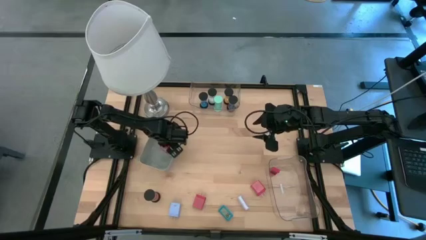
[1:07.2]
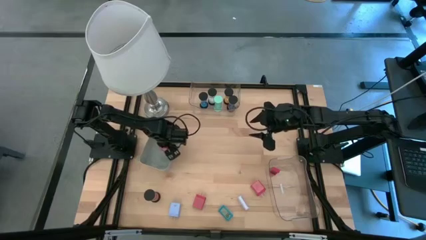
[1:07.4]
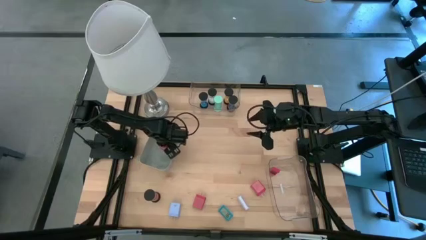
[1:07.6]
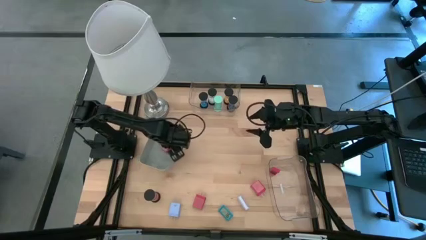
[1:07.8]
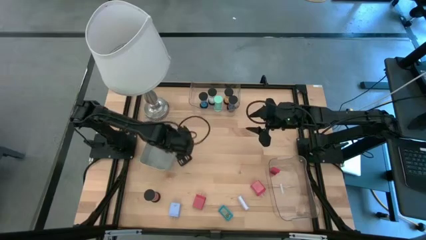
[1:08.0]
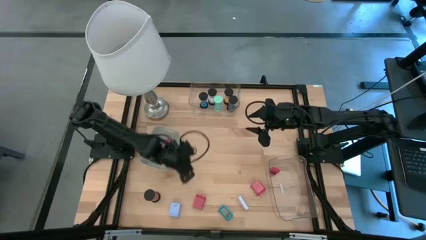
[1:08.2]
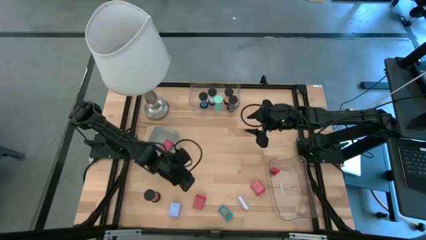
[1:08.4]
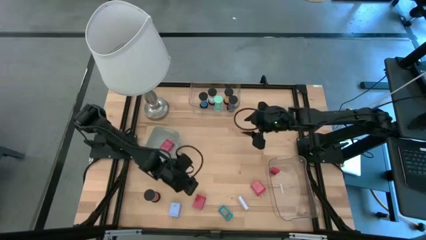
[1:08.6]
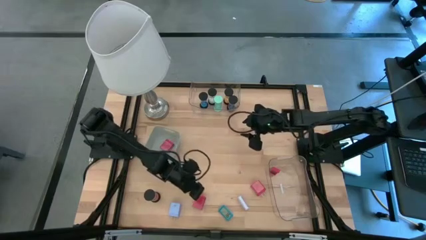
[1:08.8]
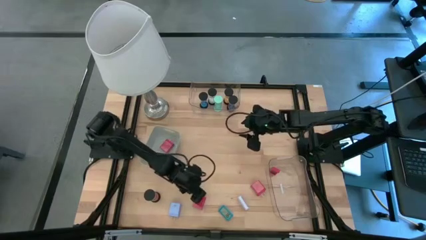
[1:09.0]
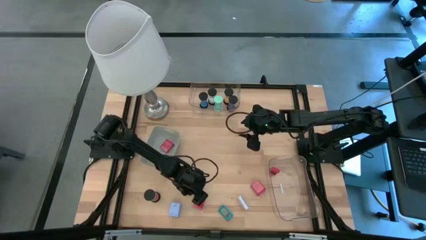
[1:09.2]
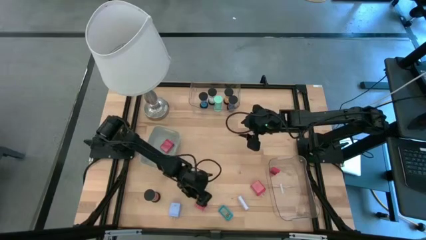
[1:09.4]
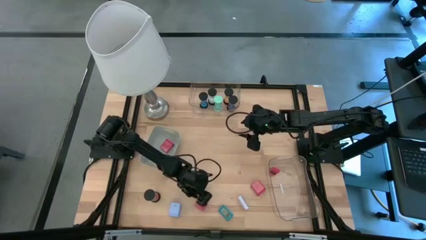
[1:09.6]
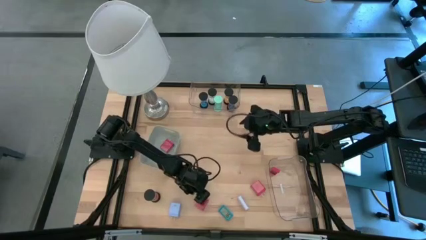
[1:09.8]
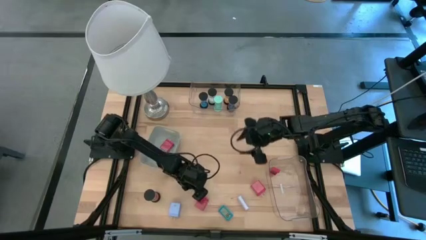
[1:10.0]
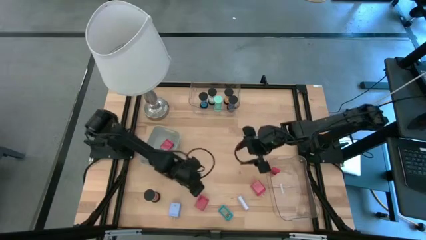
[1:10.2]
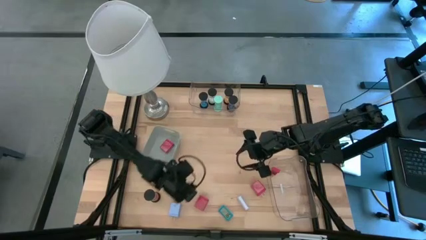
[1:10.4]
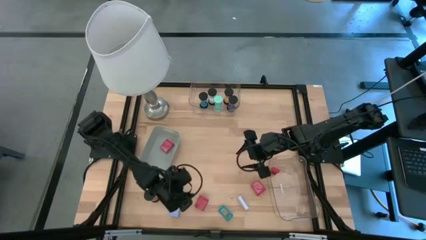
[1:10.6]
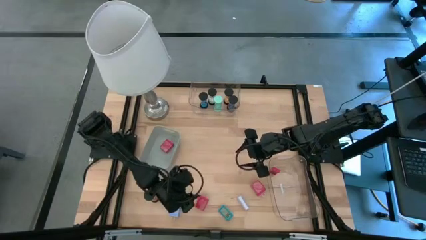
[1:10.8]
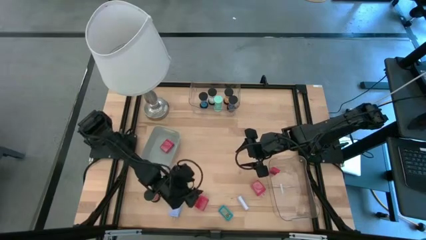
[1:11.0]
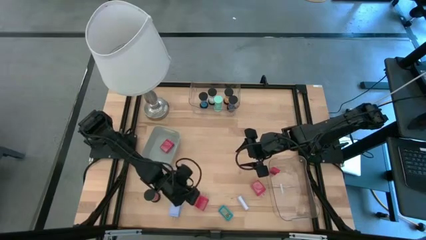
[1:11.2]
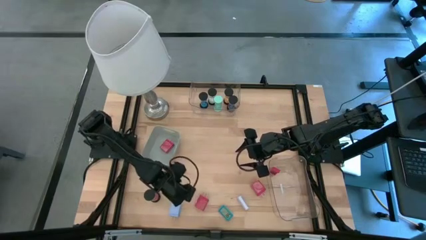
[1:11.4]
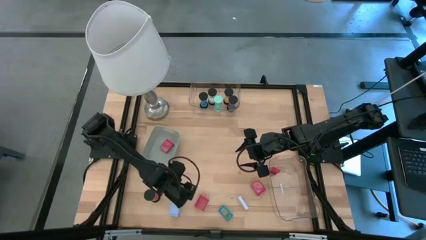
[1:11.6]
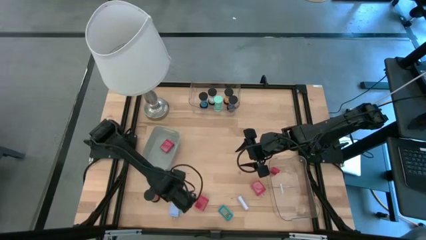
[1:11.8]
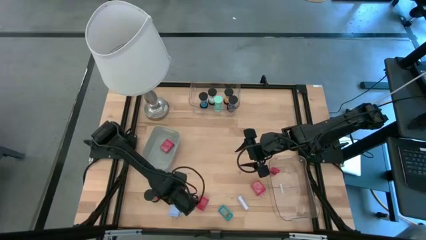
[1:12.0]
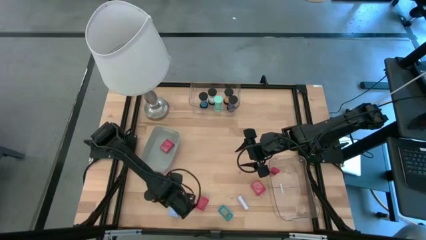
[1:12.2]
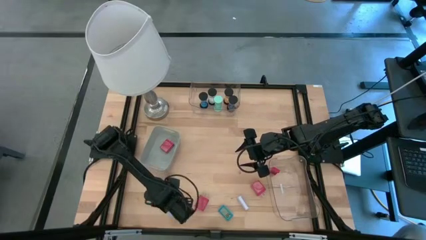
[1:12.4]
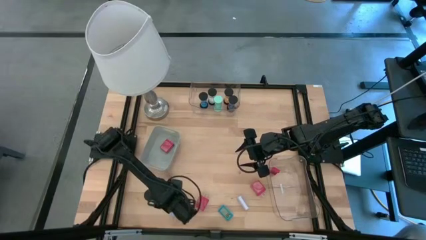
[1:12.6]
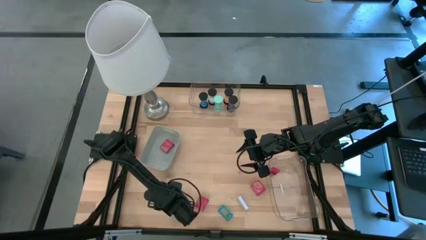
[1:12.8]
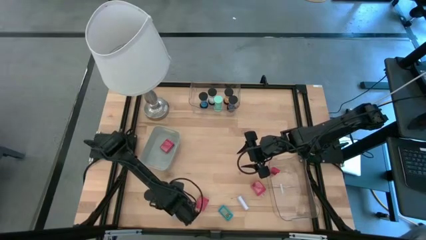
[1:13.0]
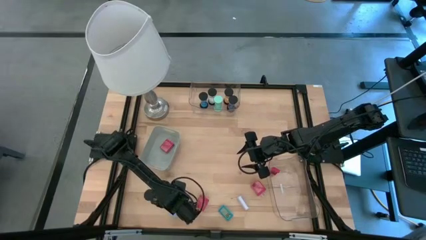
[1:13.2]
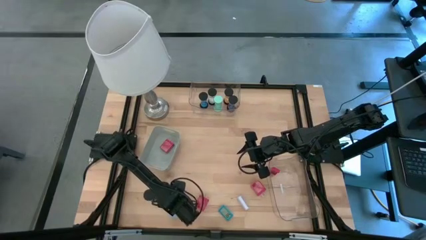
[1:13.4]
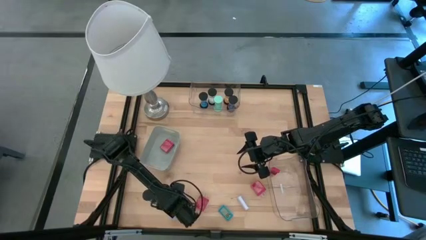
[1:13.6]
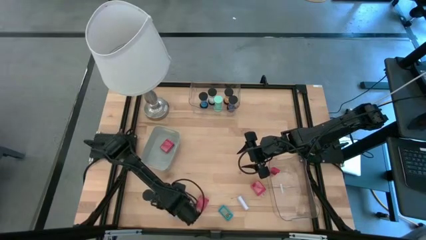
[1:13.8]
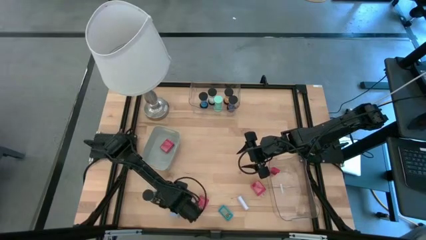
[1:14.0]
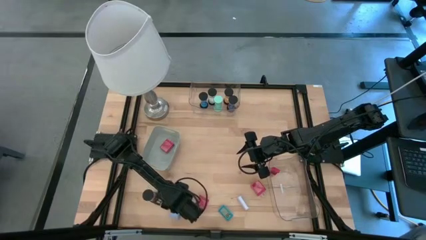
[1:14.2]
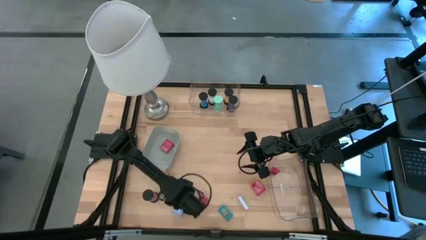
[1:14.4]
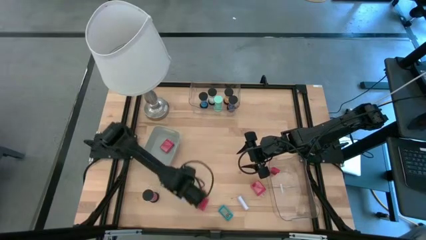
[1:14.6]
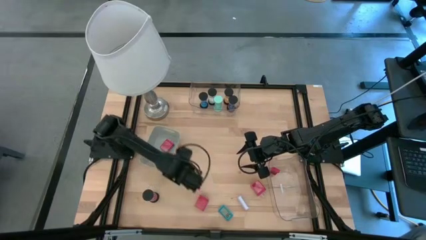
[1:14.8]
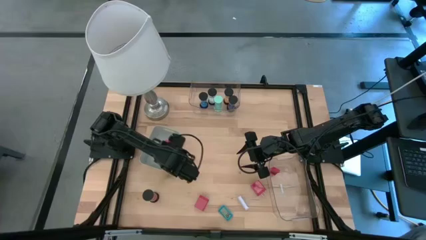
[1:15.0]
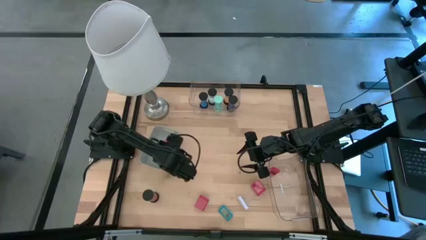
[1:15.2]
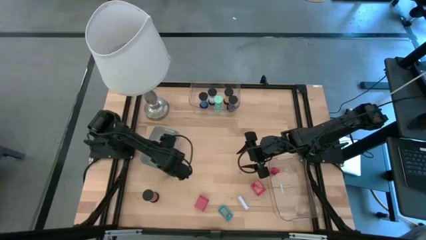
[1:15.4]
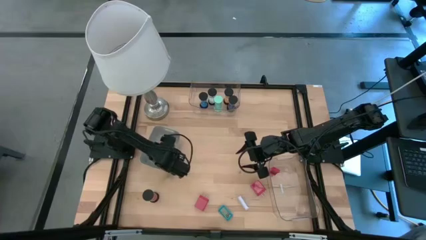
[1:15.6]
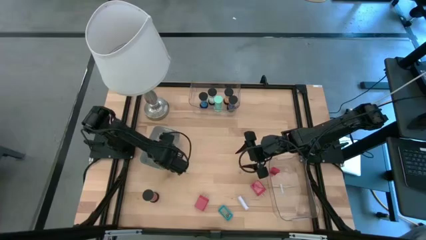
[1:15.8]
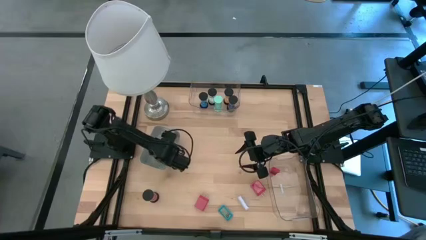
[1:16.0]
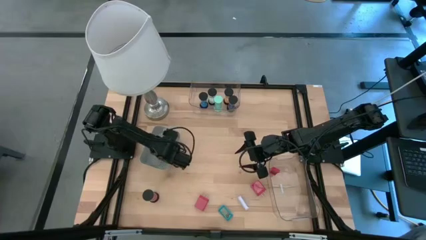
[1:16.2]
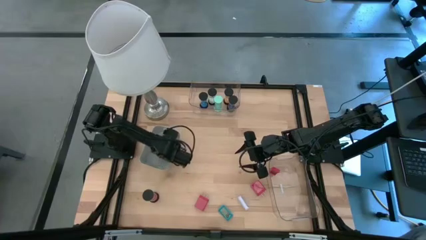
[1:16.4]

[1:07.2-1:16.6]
Task: Pick & Place Office items
Put the blue charger adapter into the gray bin

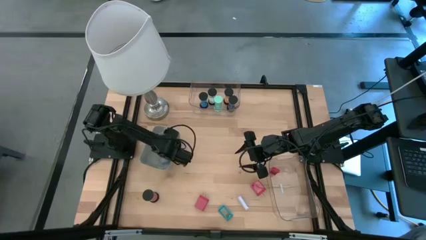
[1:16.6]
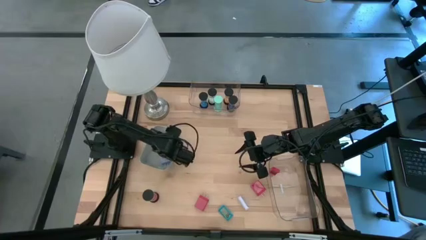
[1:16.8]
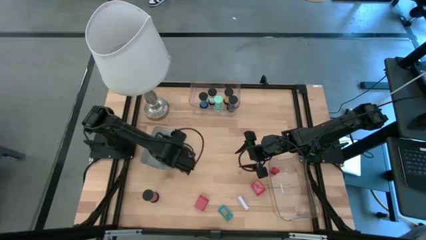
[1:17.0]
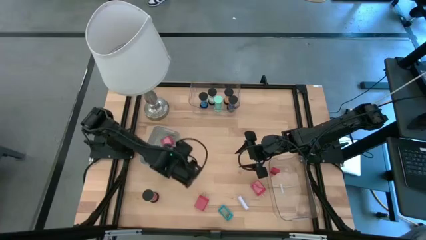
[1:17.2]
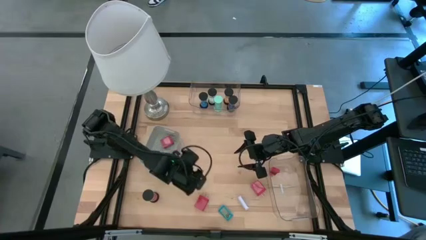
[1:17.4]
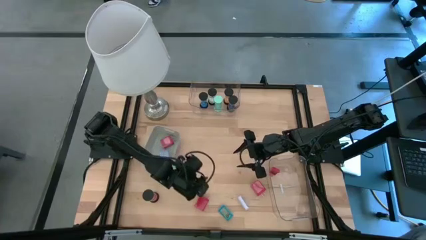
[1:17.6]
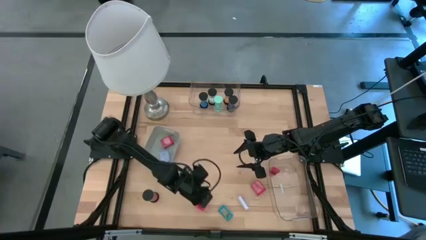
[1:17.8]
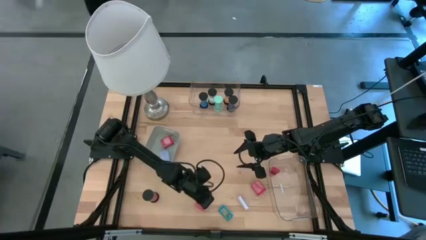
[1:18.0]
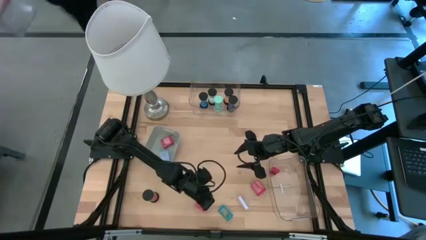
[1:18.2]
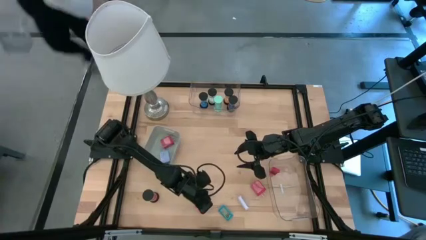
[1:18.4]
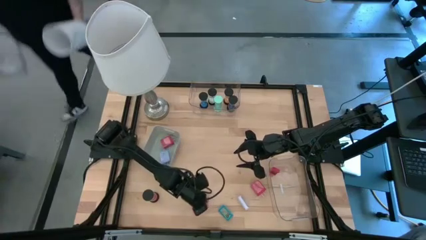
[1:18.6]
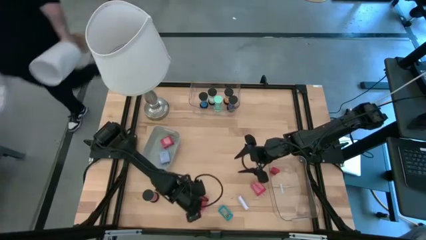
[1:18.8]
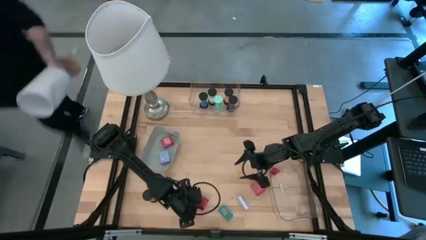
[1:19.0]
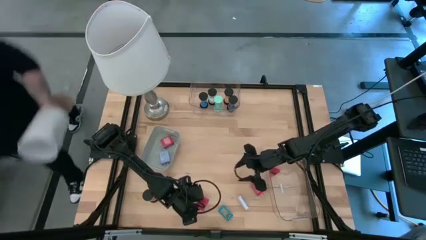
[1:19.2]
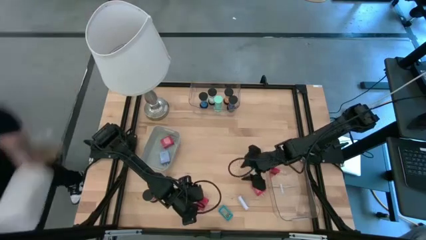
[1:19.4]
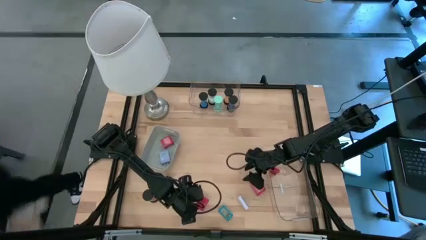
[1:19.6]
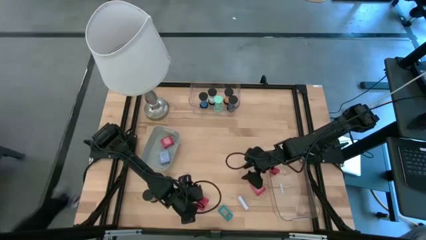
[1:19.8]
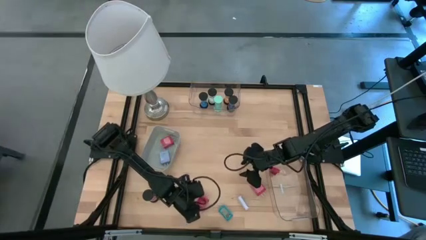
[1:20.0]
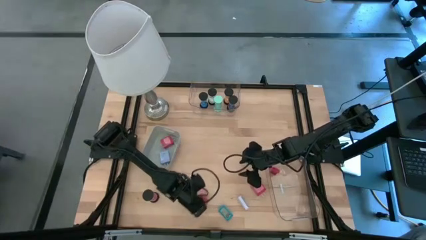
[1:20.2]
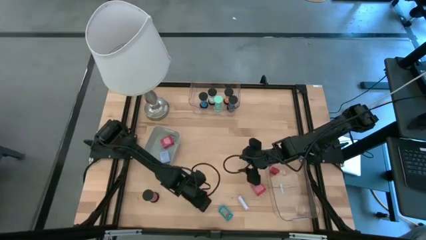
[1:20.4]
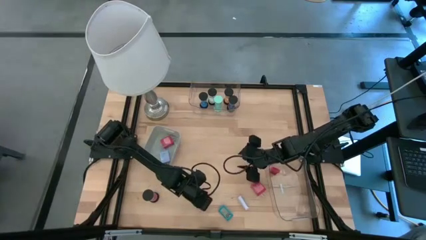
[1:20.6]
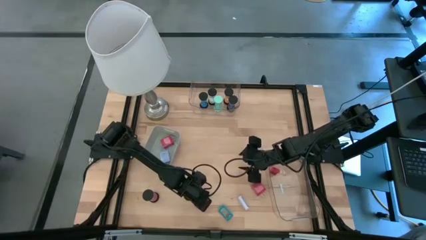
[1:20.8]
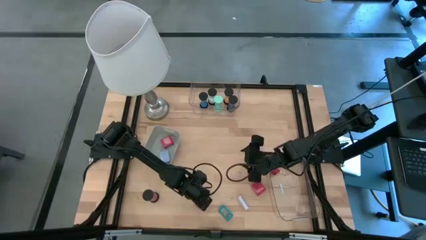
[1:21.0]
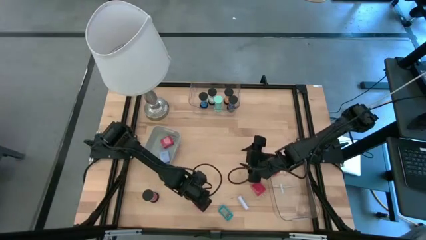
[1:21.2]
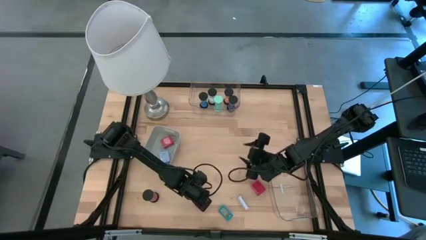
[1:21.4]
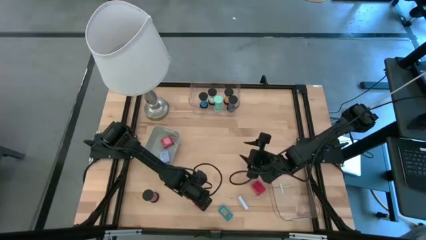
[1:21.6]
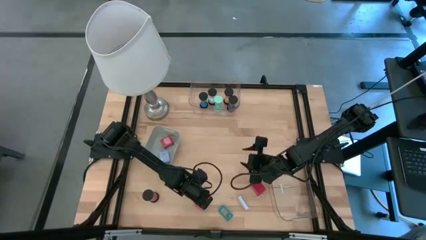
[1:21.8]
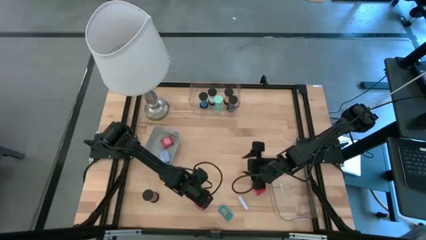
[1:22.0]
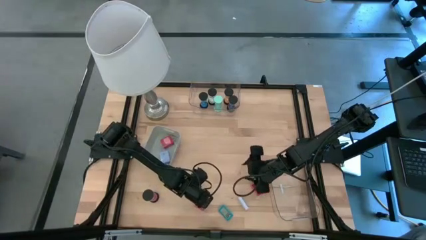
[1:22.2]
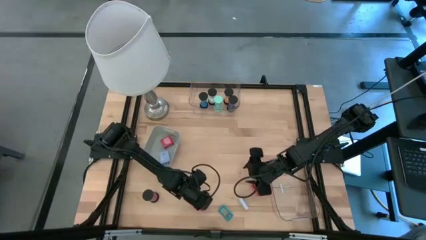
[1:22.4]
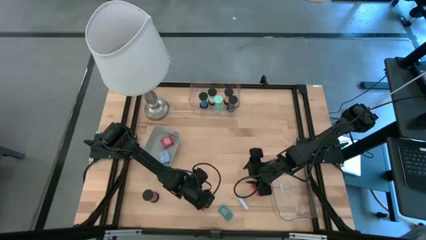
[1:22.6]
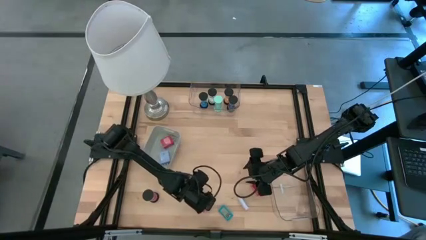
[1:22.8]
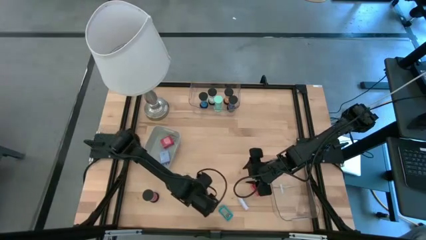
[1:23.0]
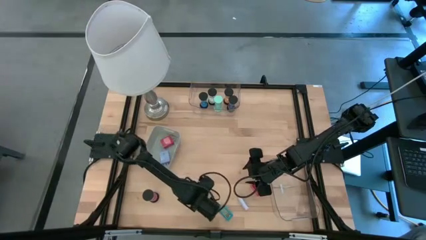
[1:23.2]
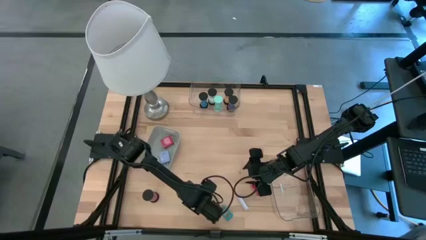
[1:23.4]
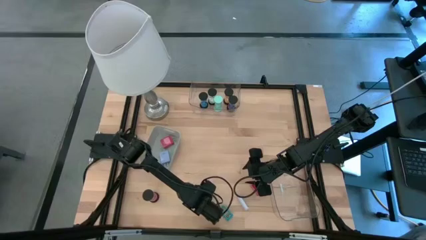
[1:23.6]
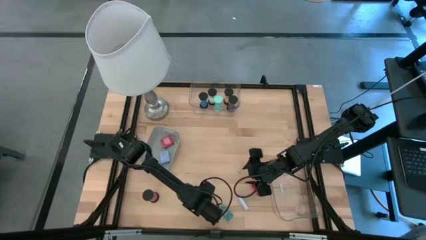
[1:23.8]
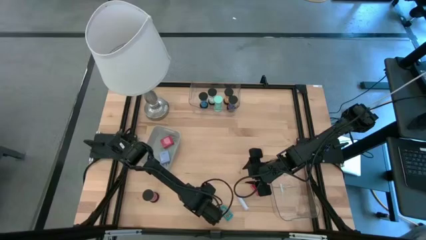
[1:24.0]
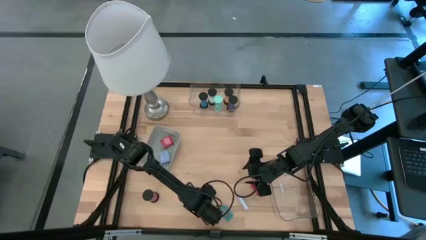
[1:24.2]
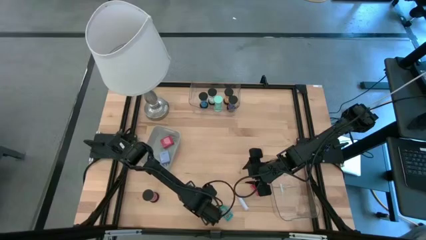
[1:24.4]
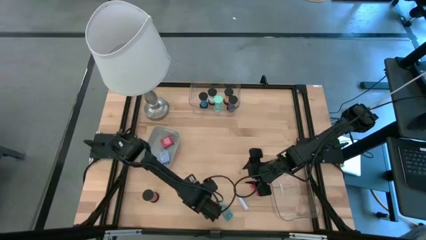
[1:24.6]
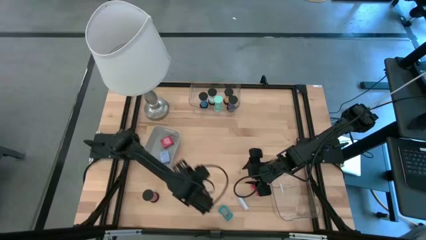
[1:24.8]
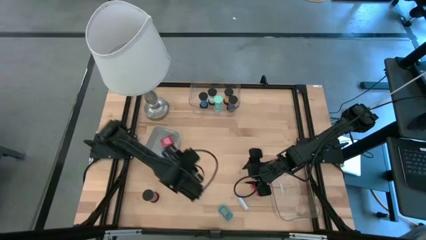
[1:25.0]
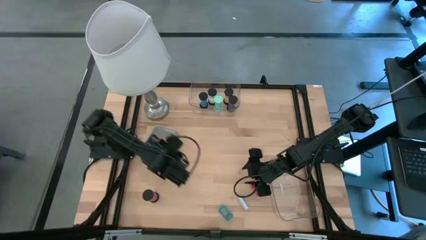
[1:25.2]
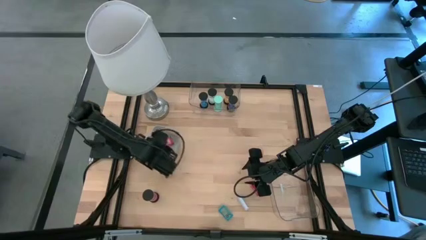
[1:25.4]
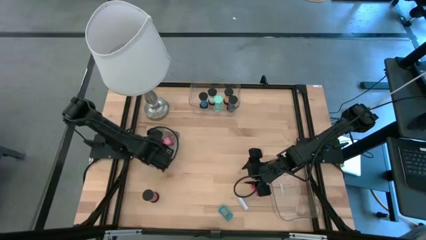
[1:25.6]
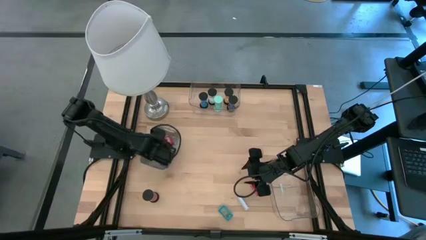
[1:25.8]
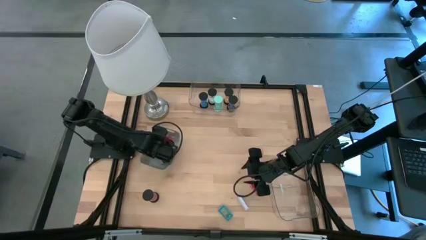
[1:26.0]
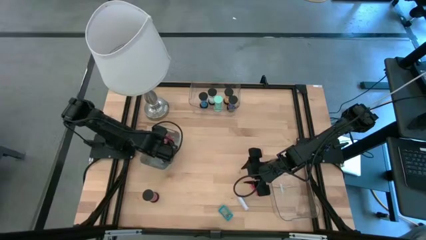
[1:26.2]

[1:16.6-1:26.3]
Put the left red charger adapter into the gray bin
